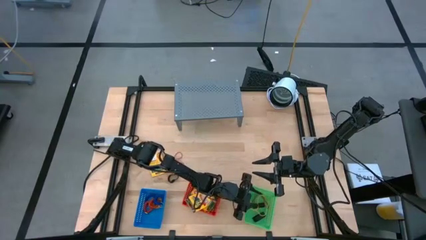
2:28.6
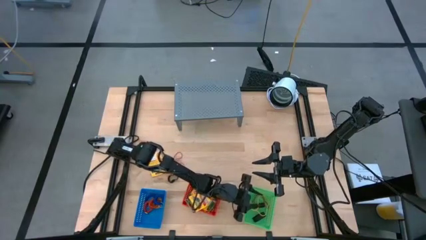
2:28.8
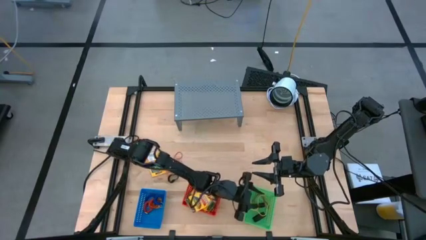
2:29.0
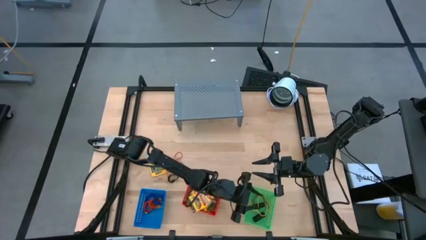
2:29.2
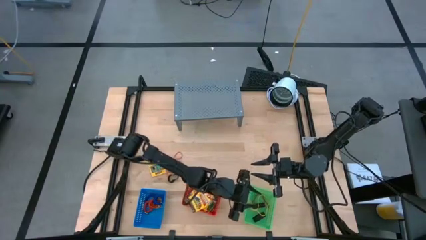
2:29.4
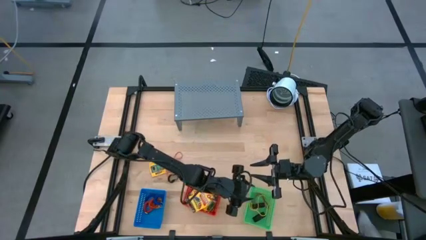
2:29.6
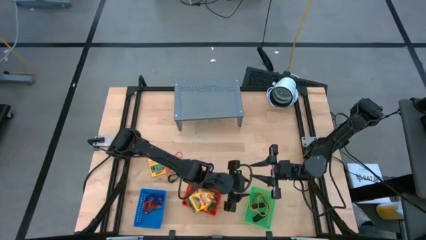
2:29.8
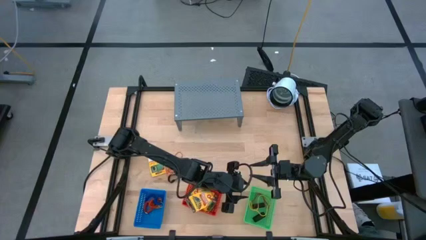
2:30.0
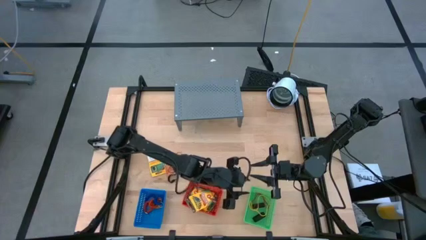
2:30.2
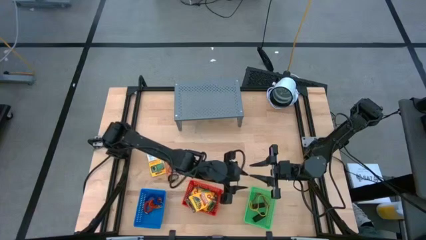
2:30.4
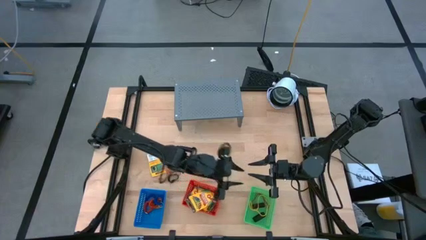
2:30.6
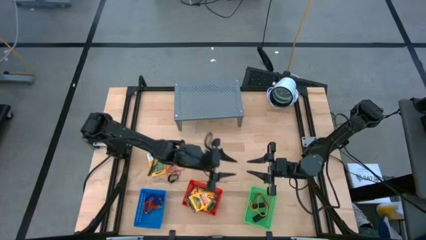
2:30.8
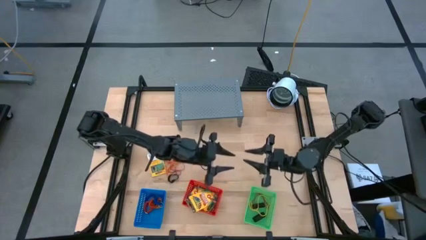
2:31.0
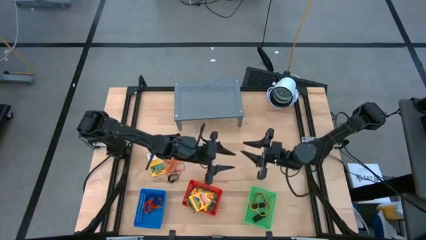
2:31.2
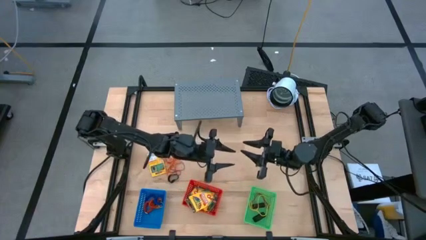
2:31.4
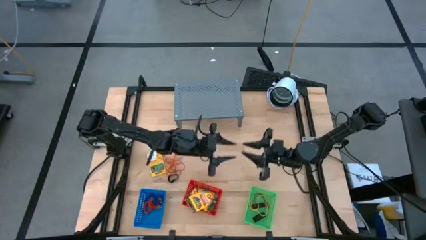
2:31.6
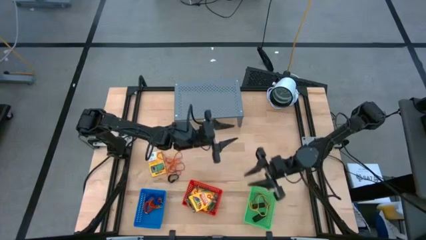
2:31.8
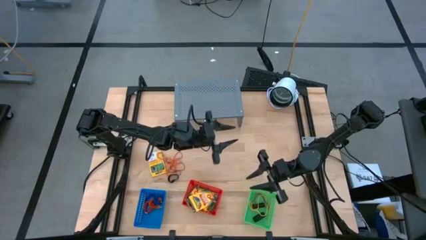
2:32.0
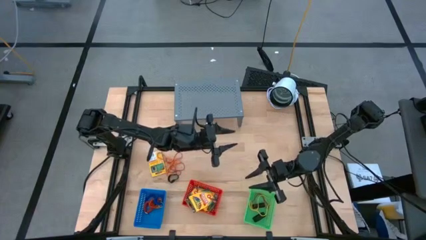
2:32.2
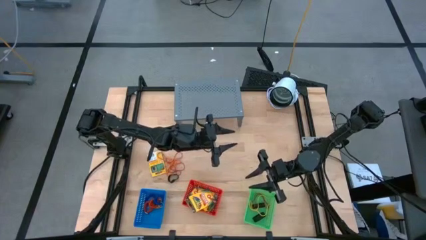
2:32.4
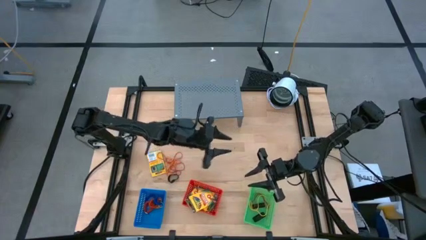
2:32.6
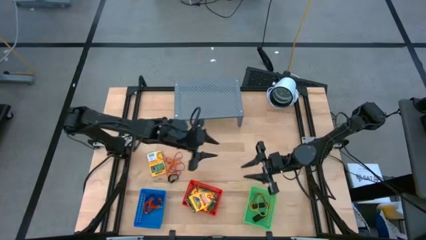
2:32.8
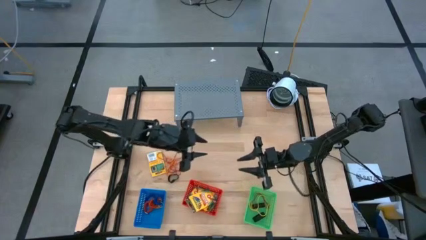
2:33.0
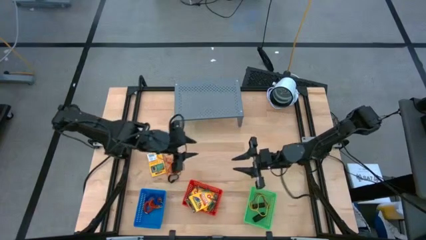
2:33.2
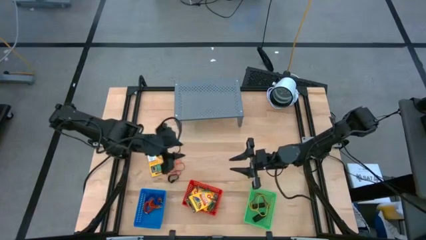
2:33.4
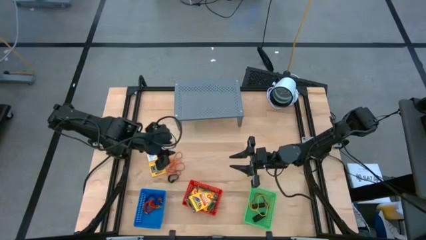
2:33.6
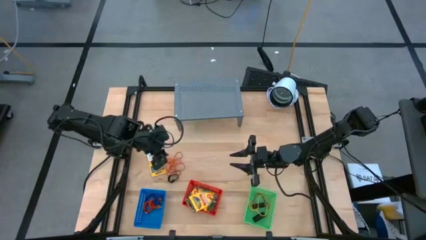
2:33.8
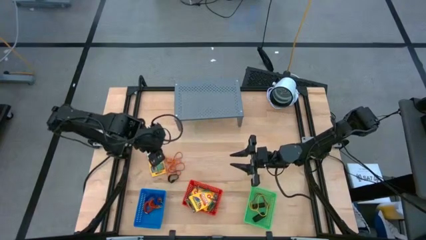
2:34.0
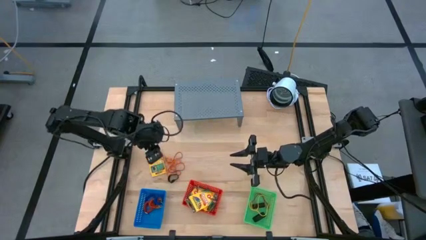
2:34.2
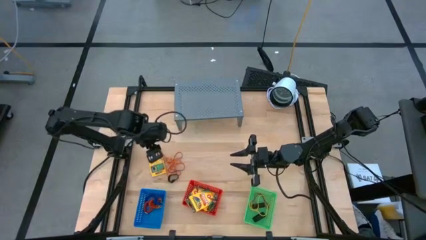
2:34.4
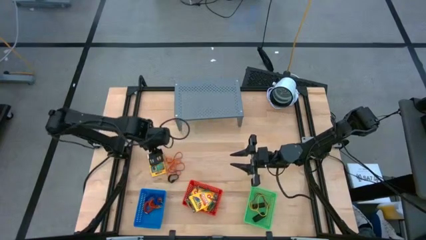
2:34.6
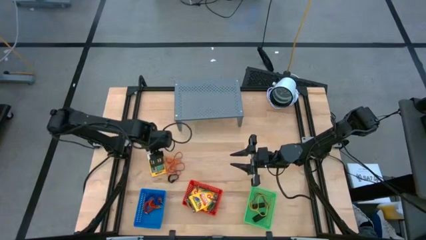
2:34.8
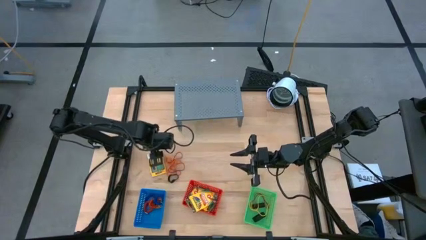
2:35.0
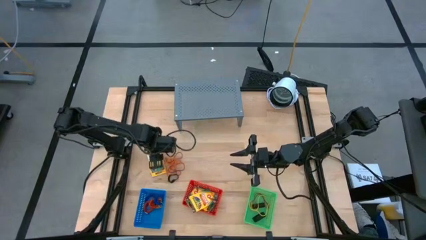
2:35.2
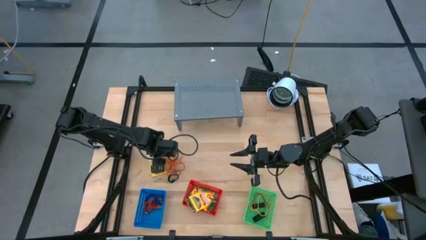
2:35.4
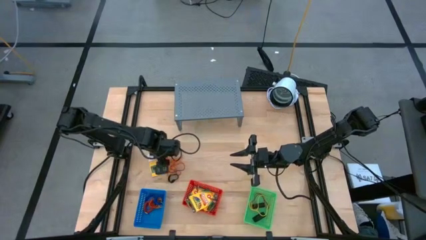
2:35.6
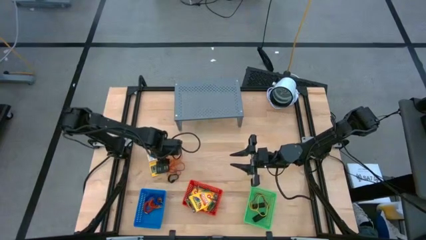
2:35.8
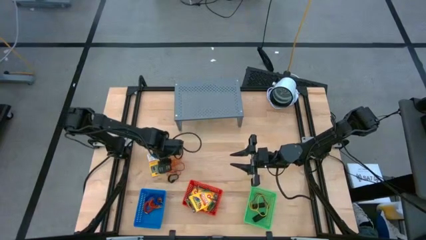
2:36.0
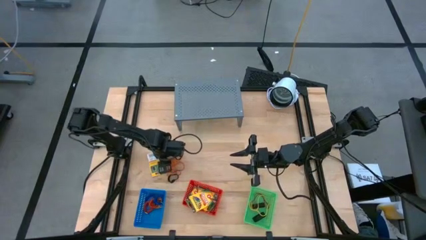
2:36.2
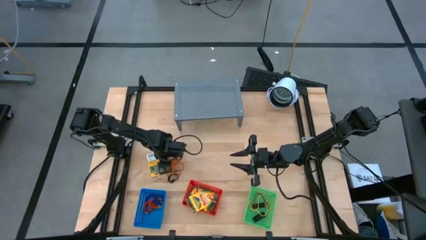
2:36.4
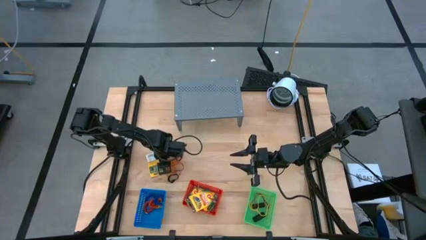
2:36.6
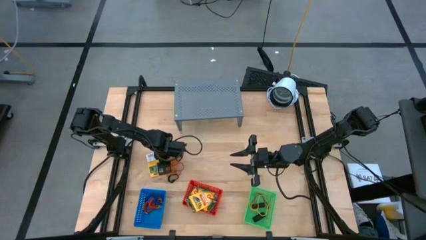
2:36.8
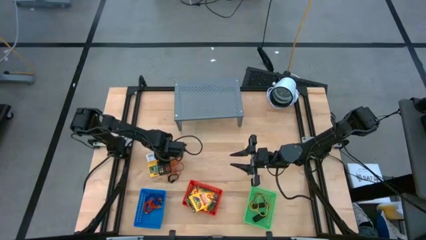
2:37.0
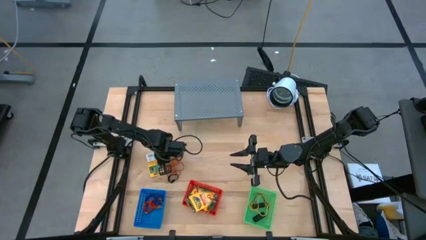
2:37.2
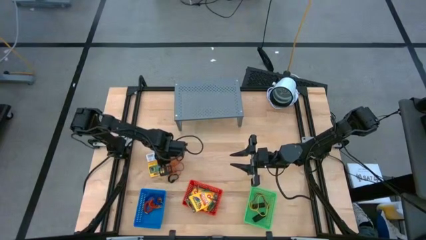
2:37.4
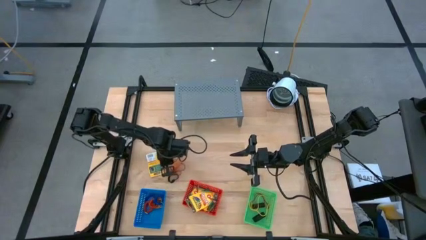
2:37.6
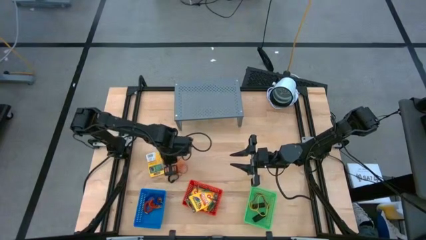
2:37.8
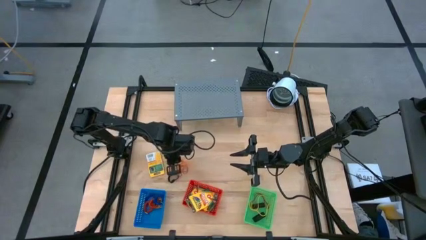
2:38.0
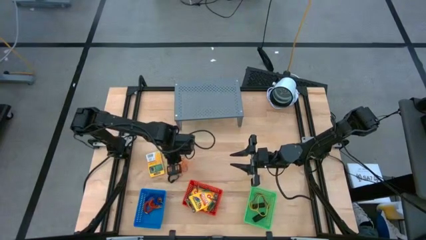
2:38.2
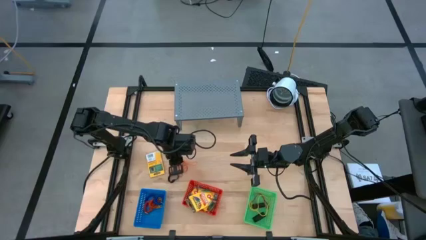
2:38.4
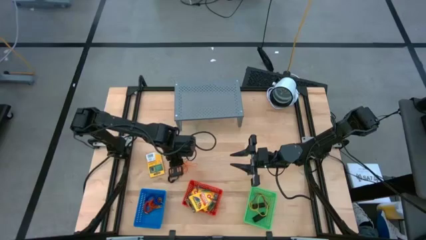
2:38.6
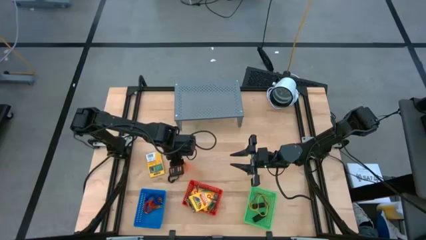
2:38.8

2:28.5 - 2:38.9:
Task: Pick & Place Office Desk Supplies
Put the top red rubber band into the green basket

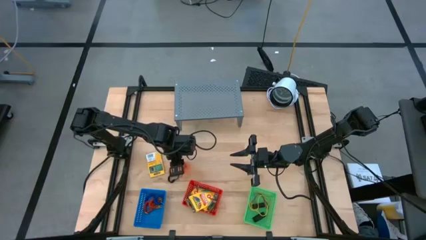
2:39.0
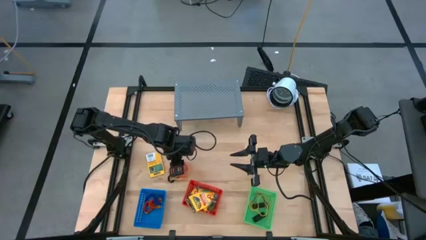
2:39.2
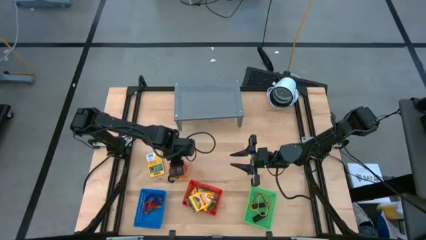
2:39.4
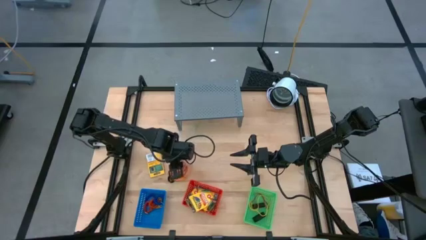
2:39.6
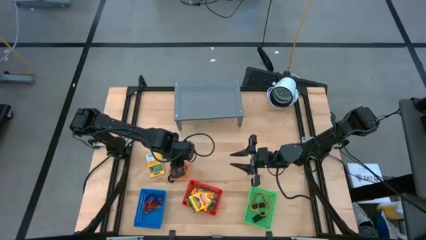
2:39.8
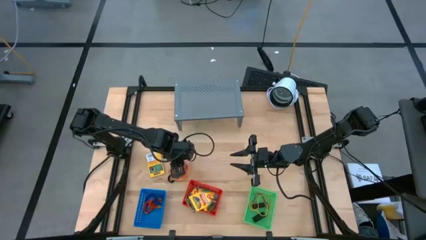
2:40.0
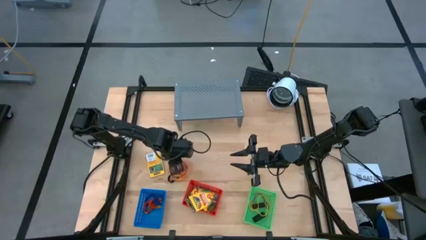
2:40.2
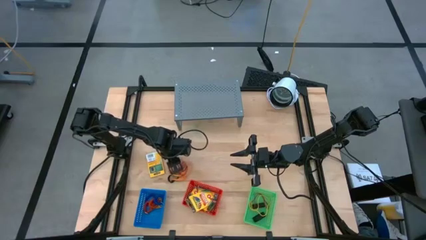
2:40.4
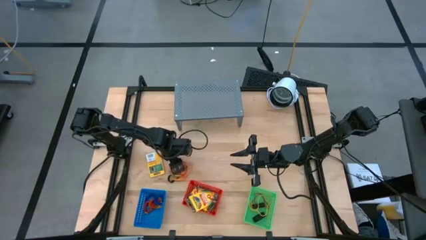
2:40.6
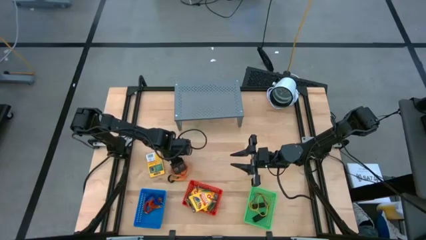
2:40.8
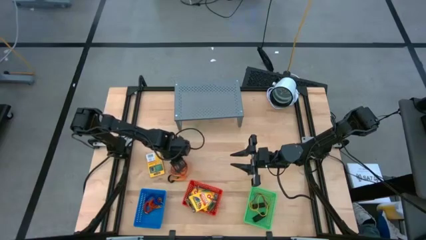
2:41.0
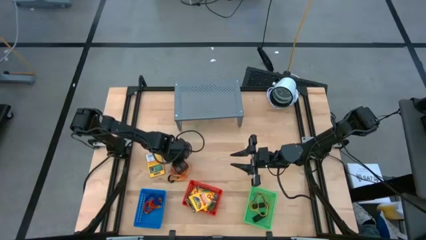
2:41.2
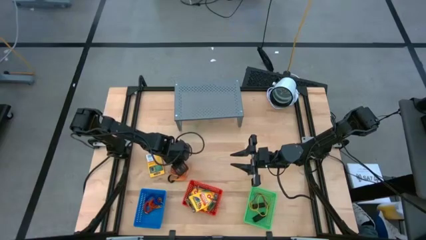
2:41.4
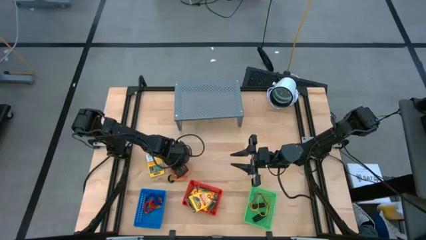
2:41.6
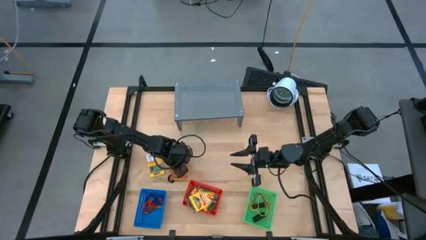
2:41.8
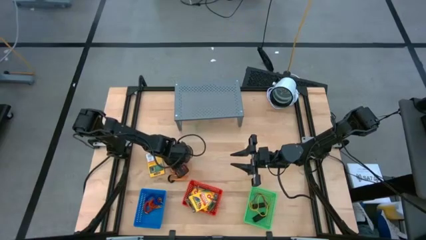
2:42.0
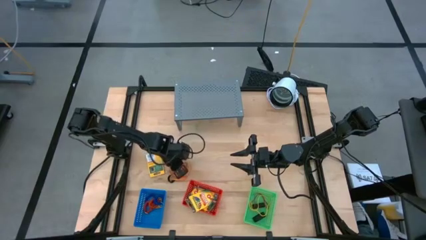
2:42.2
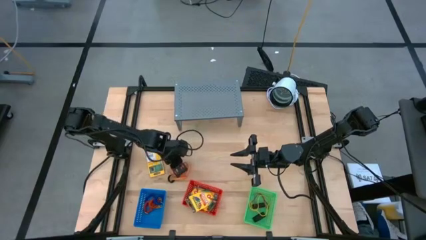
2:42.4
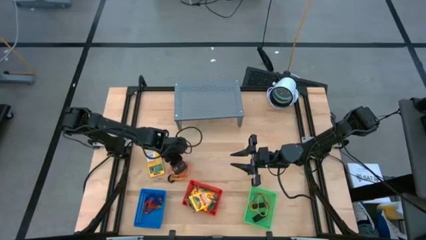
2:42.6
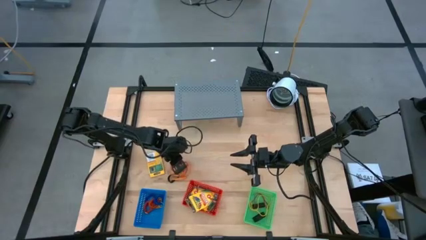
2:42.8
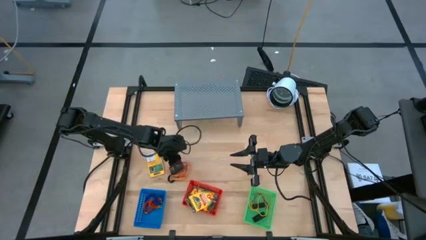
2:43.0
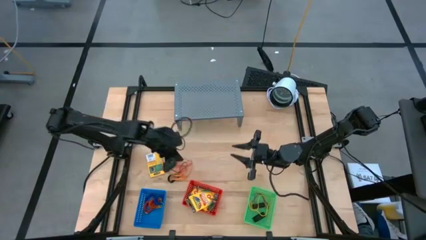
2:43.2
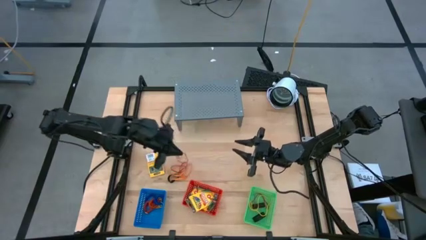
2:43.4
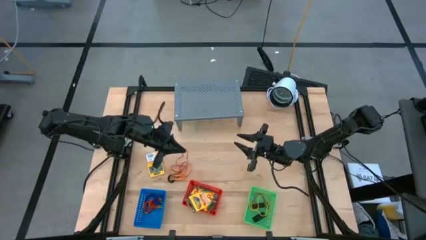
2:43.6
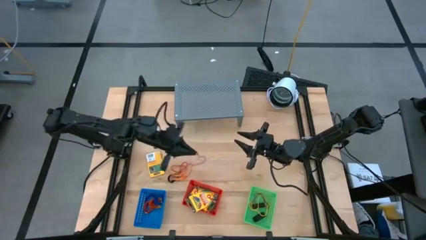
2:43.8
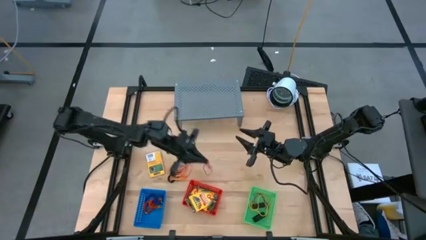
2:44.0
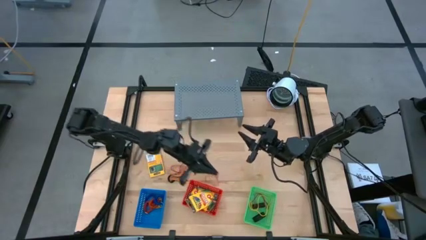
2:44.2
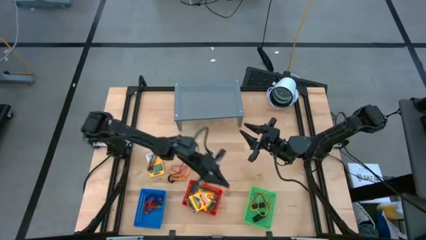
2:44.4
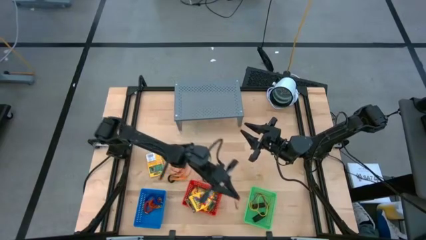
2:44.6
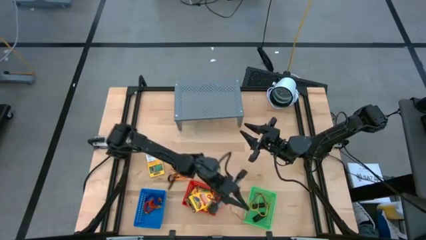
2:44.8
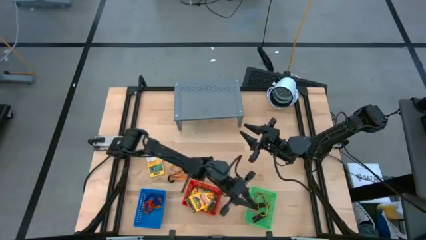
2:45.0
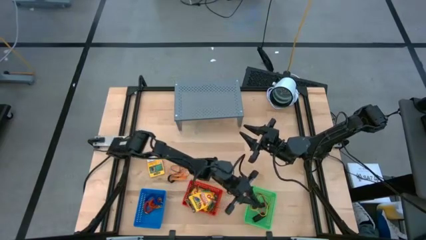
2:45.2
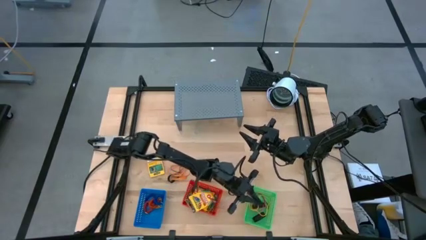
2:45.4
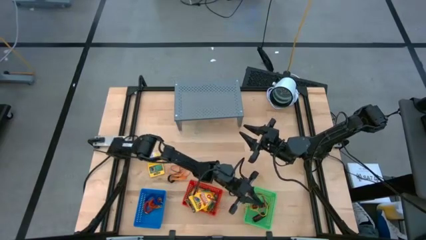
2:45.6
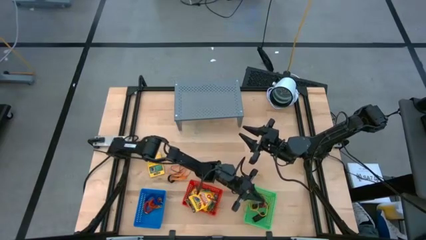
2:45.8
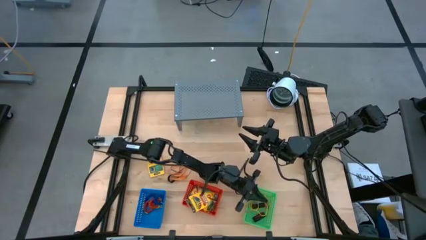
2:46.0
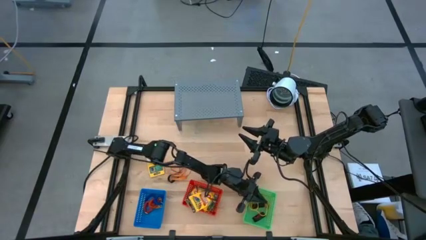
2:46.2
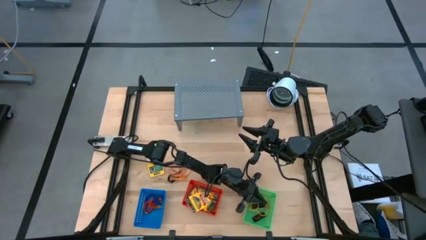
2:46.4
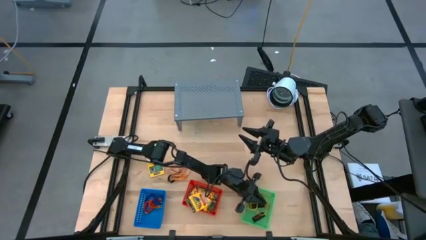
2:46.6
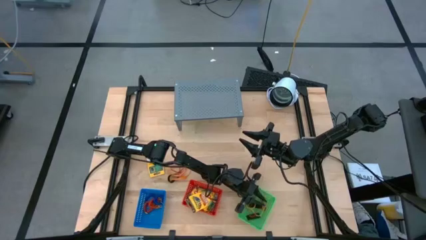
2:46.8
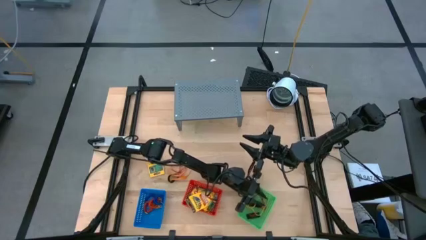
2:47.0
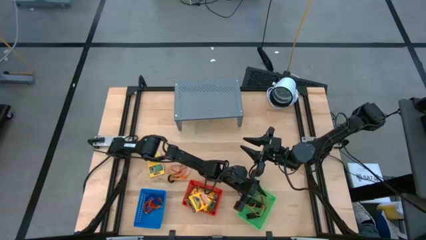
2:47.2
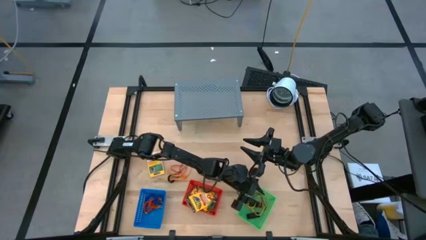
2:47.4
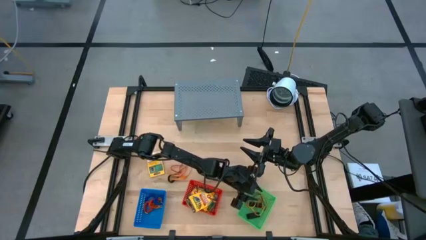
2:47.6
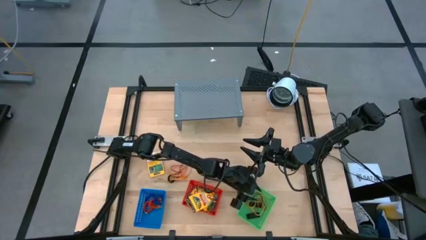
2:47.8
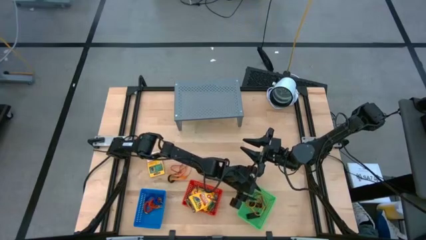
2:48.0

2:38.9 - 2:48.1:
Put the top red rubber band into the green basket
